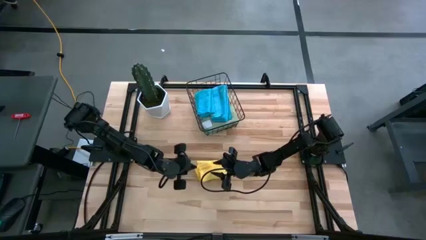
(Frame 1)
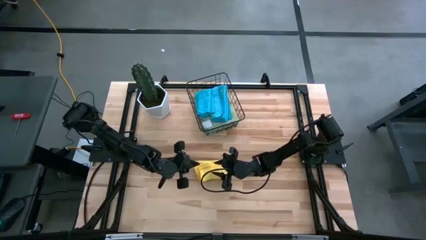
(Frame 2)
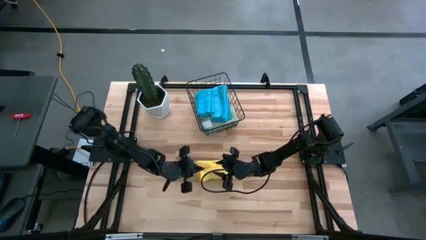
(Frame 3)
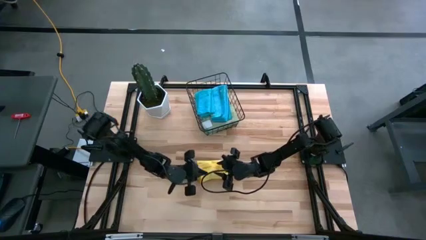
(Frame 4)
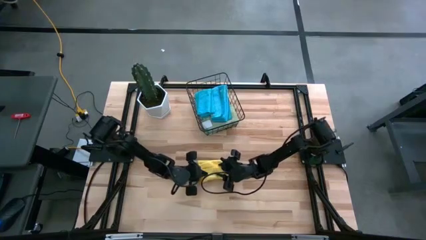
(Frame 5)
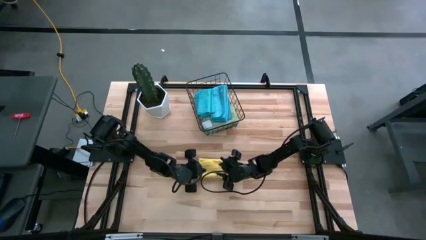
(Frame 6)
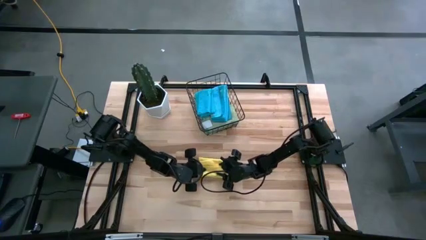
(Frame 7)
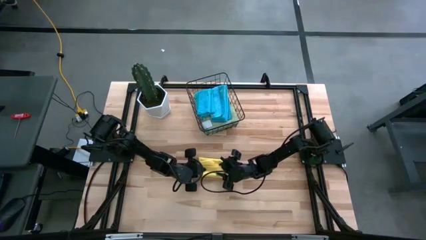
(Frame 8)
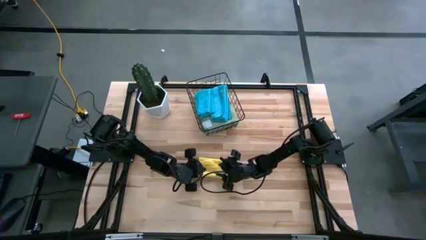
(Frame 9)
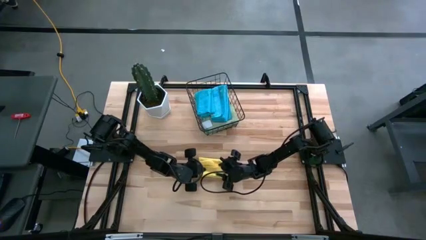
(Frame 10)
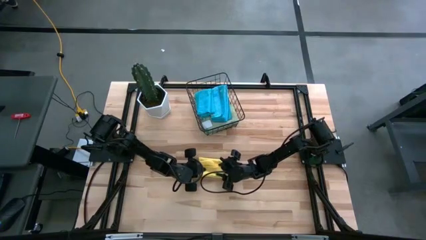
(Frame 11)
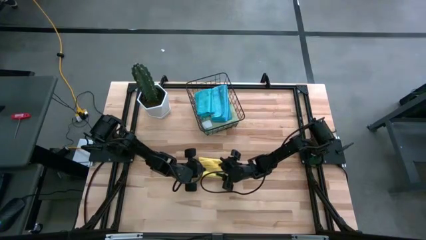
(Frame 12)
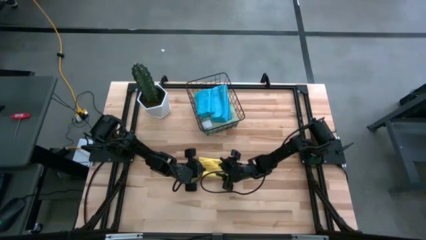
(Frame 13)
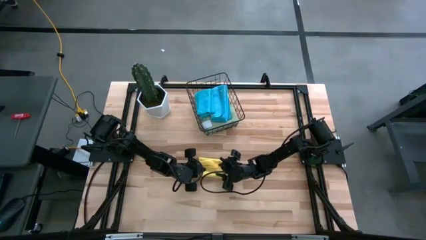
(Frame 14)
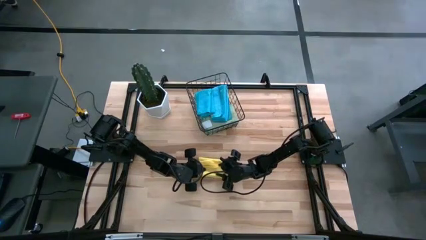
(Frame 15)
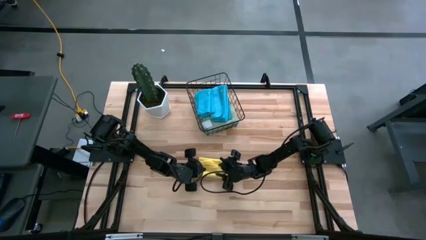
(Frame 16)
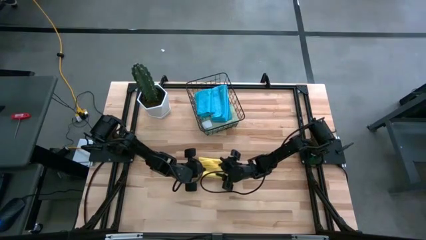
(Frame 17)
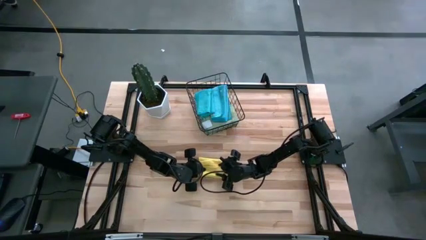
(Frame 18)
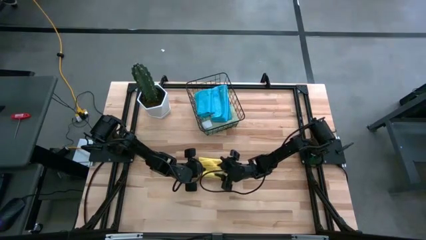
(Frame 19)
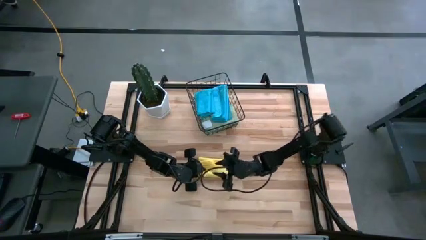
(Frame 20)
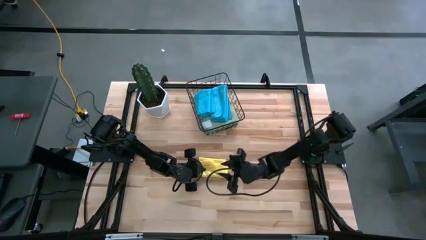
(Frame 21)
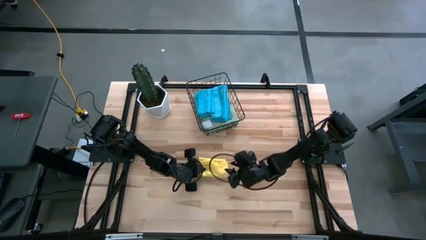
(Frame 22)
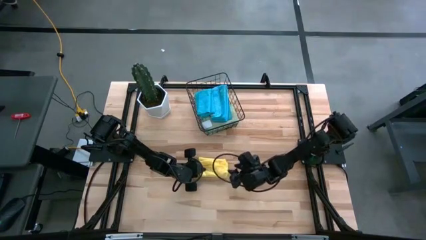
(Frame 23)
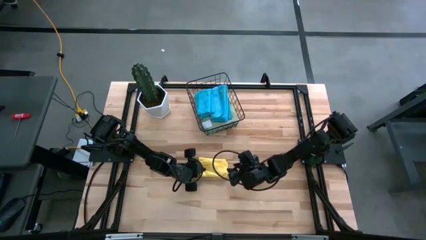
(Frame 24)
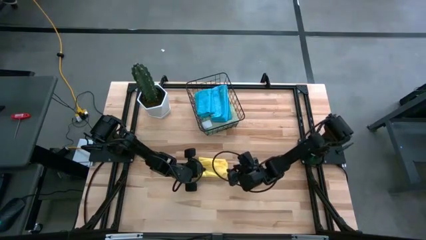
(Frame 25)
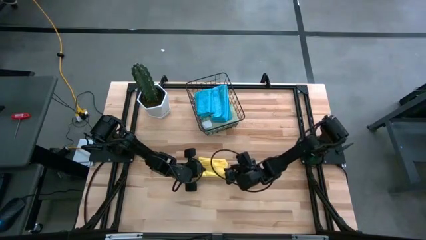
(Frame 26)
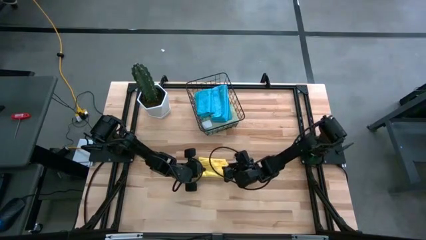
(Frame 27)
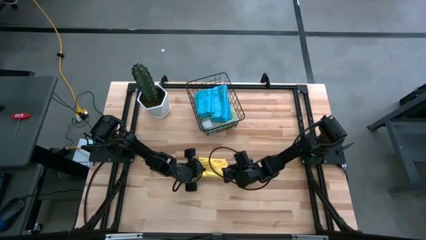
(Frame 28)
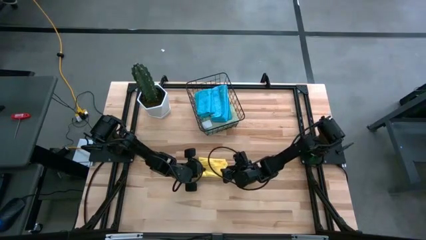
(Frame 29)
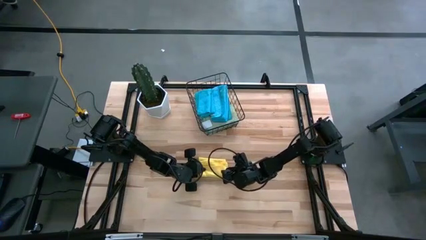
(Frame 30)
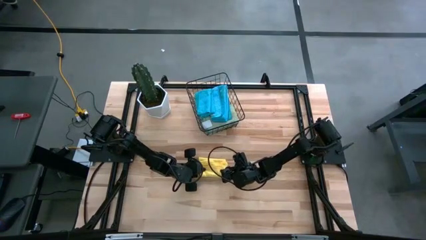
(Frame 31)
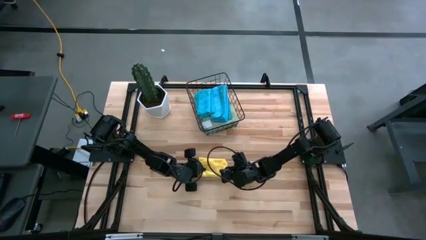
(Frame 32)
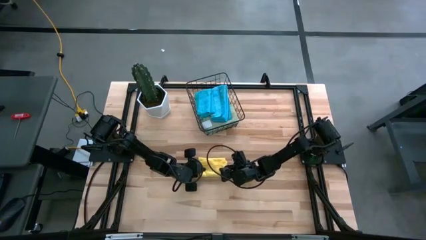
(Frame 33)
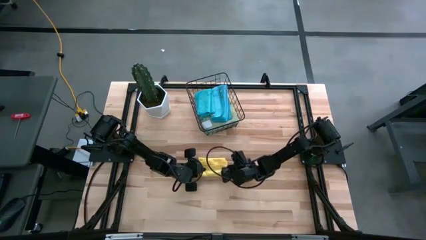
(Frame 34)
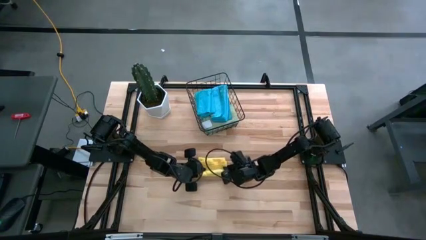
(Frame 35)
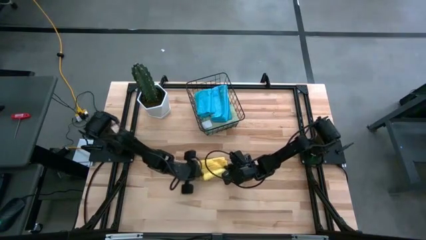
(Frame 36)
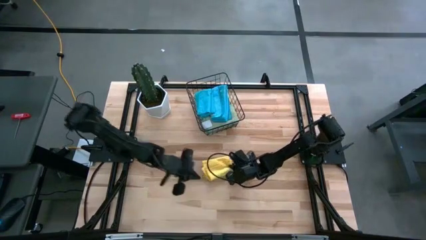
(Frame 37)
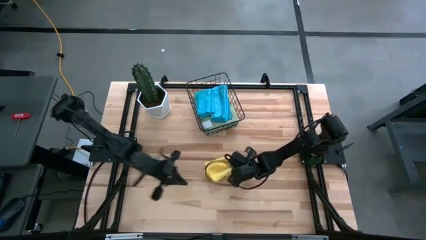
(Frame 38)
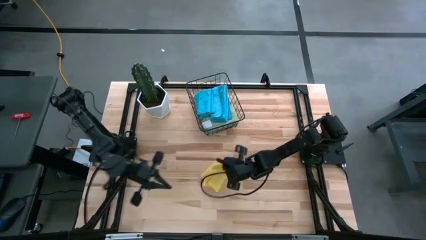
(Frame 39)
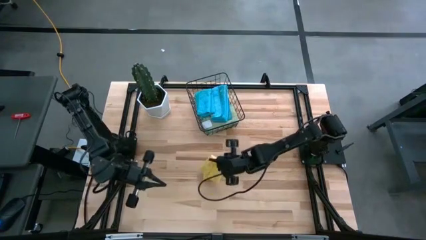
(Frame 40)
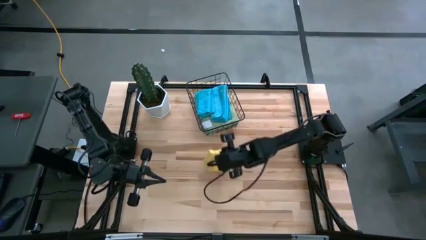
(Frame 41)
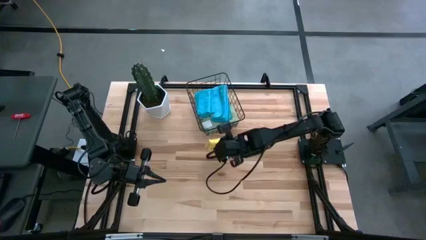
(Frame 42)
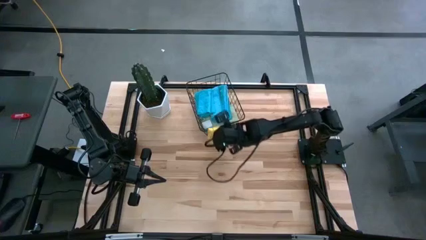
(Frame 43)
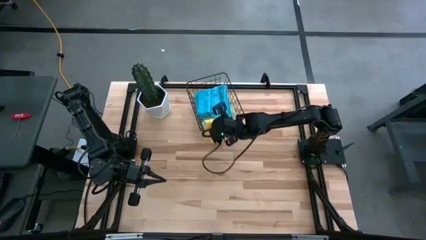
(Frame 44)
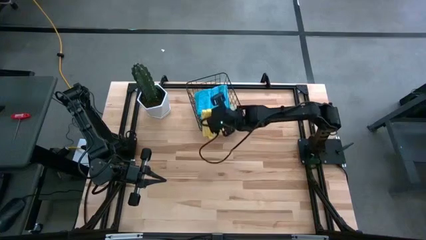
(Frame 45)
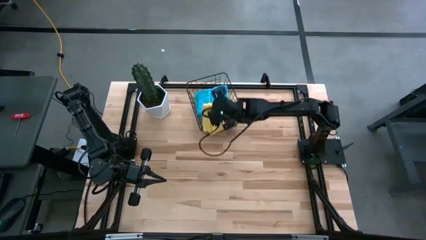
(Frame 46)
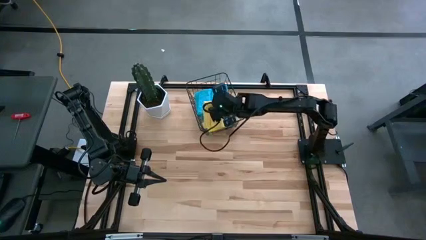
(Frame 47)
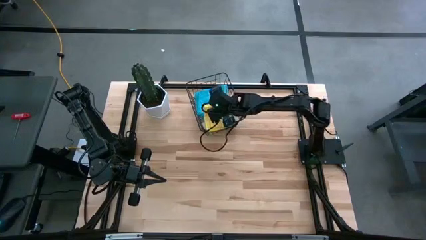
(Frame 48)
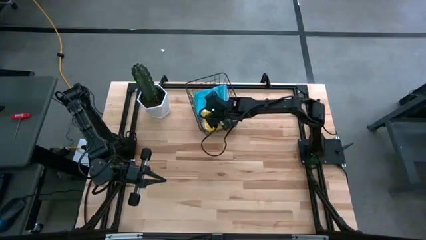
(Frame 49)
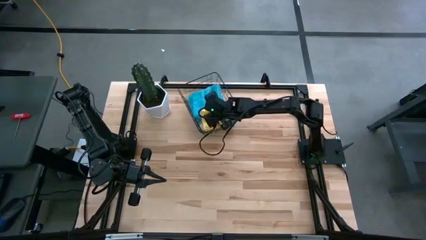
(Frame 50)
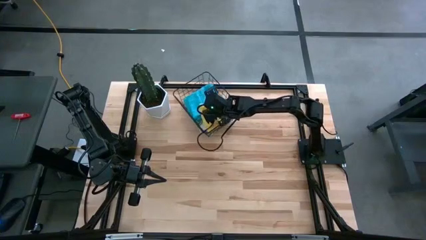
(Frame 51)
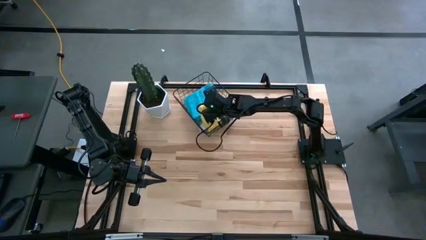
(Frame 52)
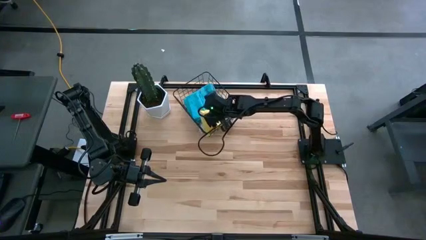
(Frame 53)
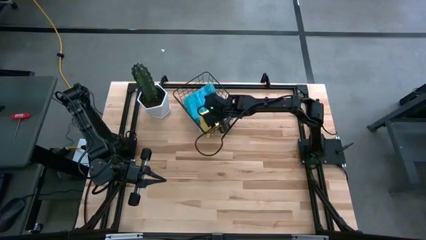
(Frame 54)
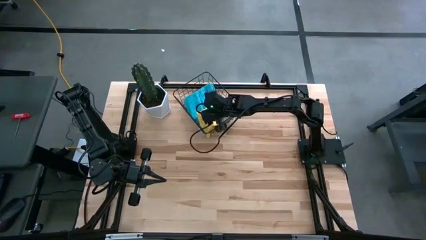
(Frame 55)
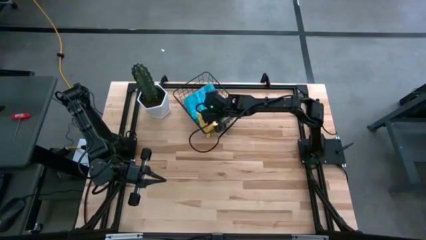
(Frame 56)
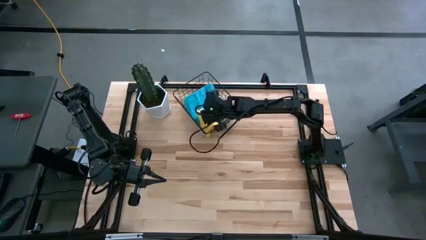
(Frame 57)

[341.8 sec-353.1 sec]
Task: Fold microfiber towels
Put the yellow microfiber cloth into the black wire basket

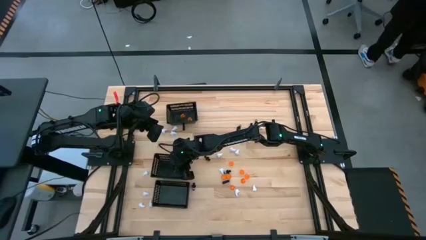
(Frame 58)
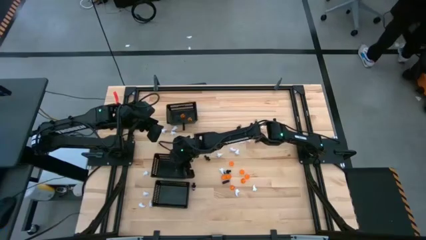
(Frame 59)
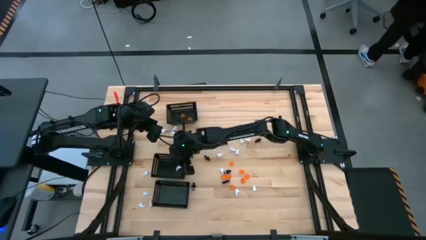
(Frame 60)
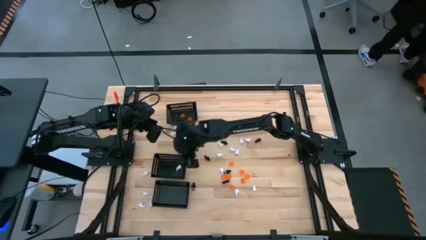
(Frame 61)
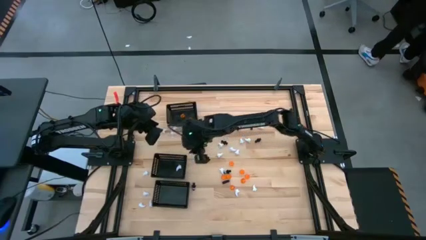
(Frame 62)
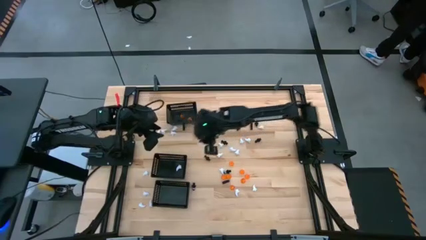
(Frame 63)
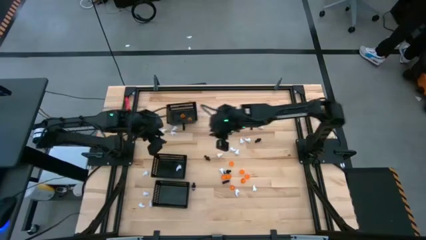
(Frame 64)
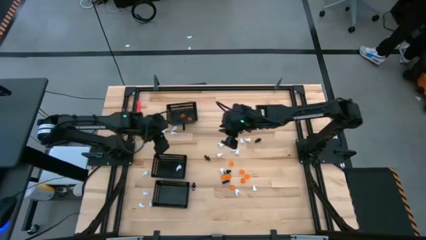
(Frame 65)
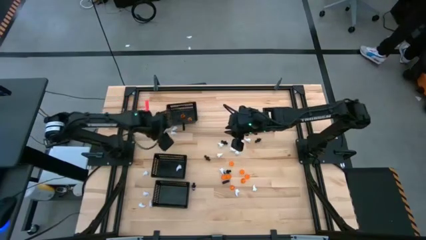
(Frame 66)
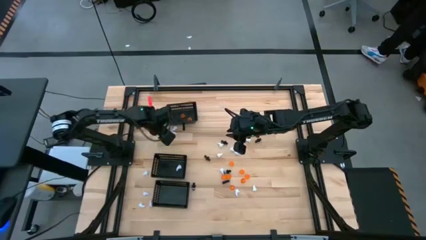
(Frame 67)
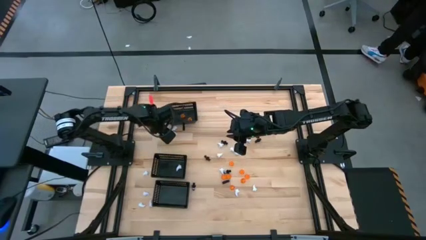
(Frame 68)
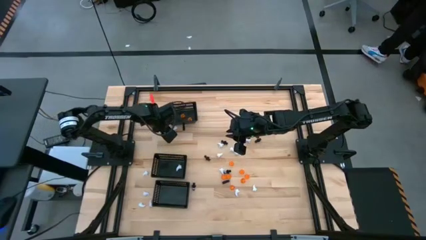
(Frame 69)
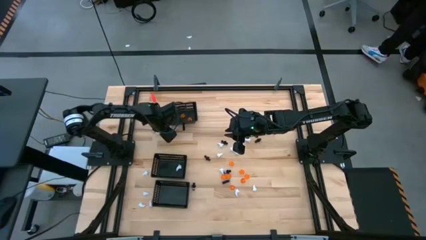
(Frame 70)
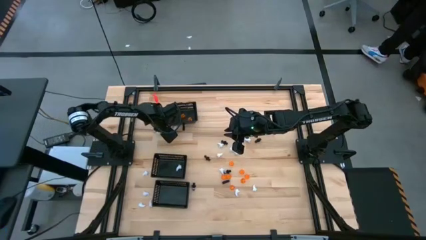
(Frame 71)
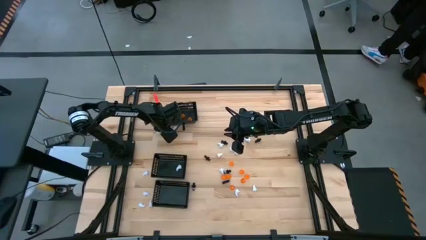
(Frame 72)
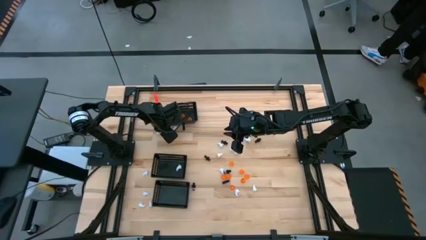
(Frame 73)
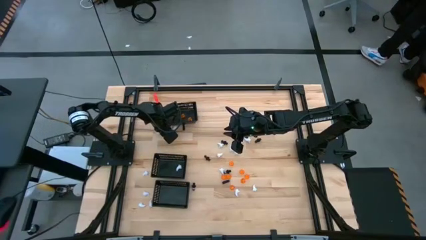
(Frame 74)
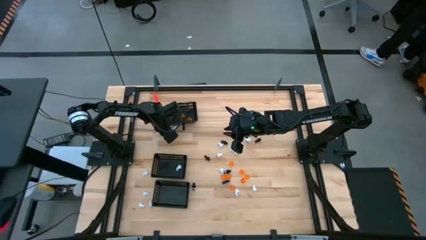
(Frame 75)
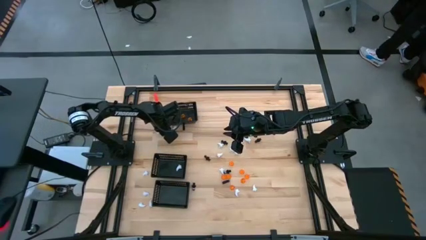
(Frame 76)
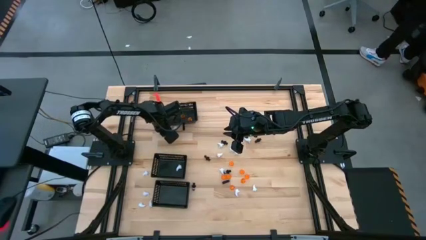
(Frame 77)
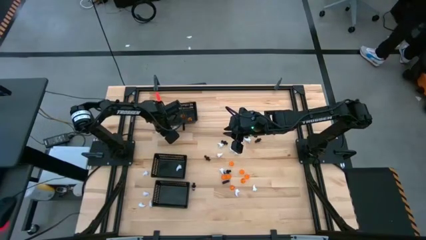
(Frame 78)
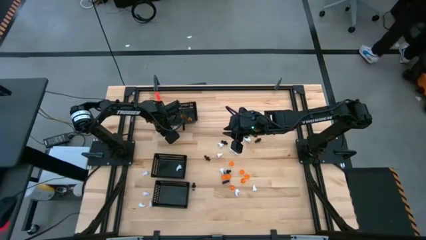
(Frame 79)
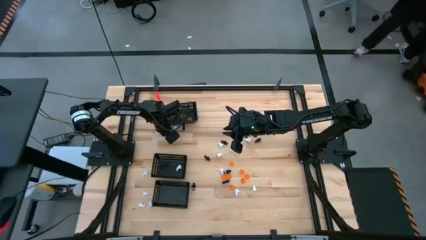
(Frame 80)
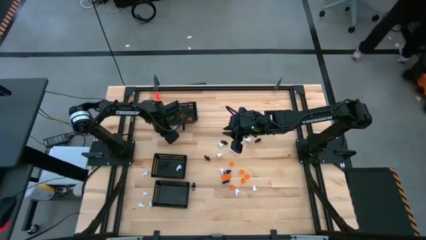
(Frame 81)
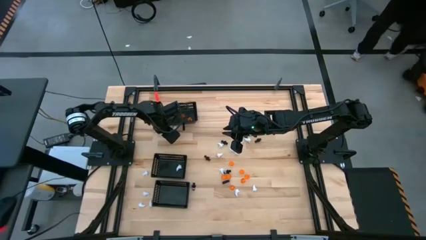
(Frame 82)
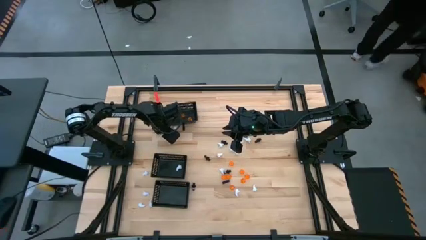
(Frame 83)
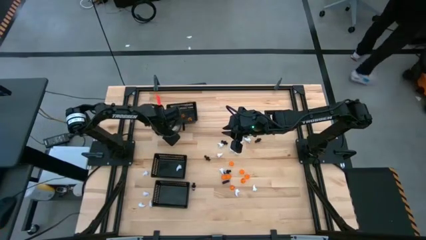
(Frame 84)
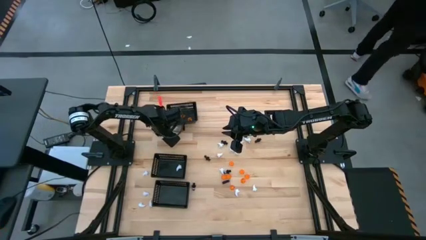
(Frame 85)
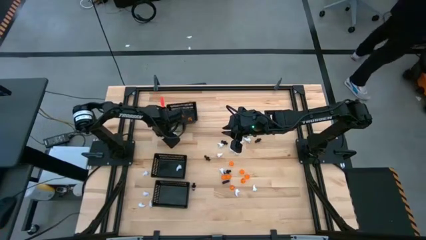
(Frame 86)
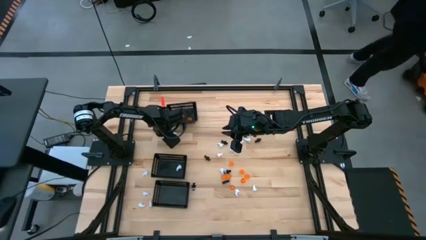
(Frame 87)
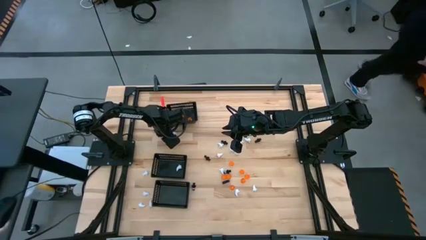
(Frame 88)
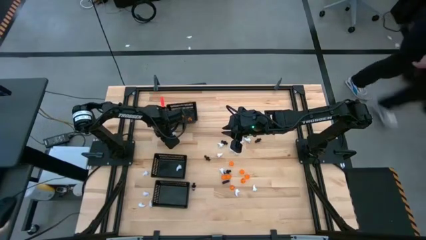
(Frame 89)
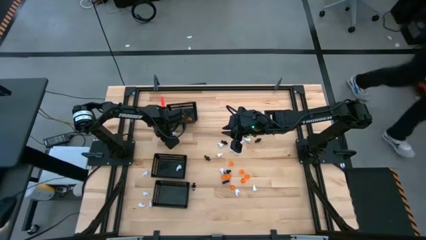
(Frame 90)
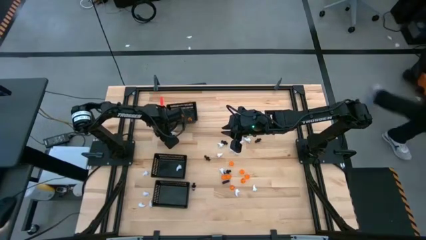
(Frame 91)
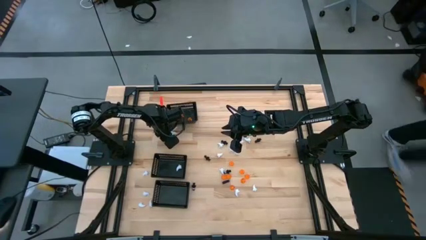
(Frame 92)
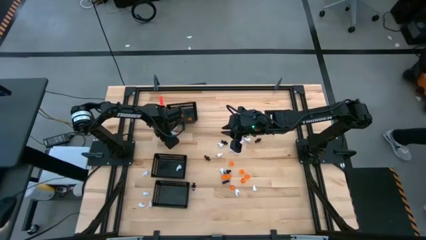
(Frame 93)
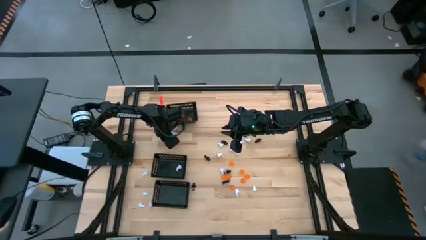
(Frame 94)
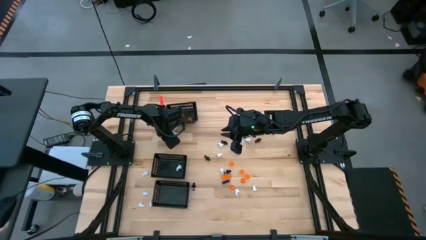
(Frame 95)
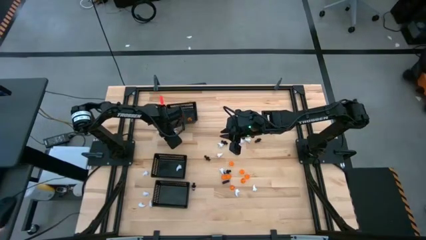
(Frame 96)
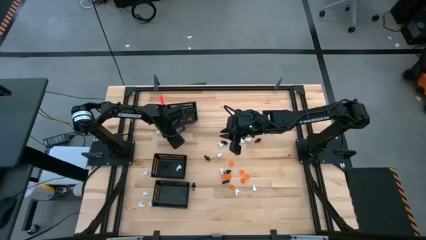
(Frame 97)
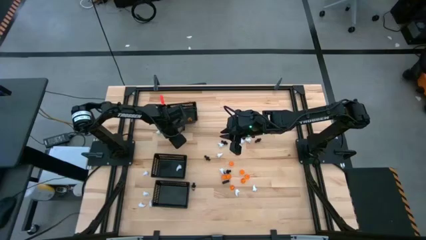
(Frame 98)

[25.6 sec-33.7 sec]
Task: Sort Halloween decoration
Put the white toy into the middle black bin
